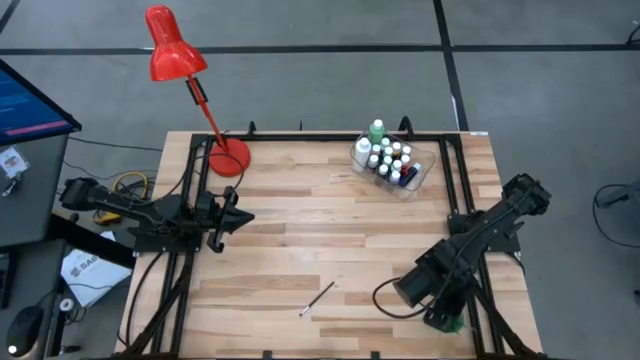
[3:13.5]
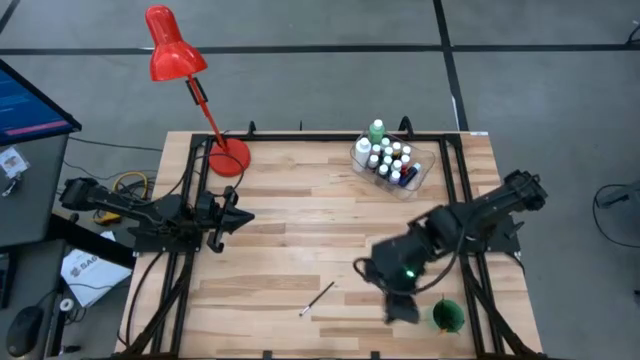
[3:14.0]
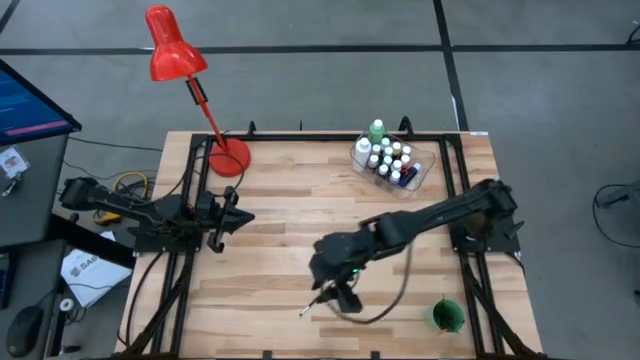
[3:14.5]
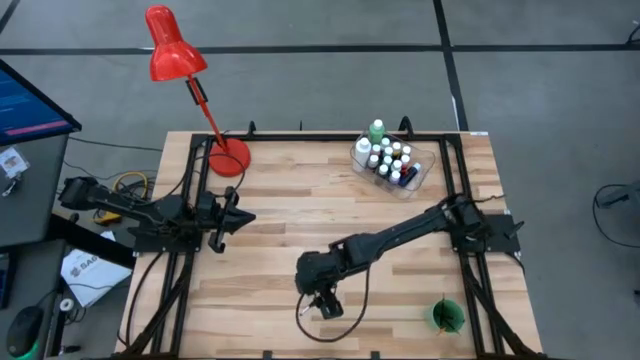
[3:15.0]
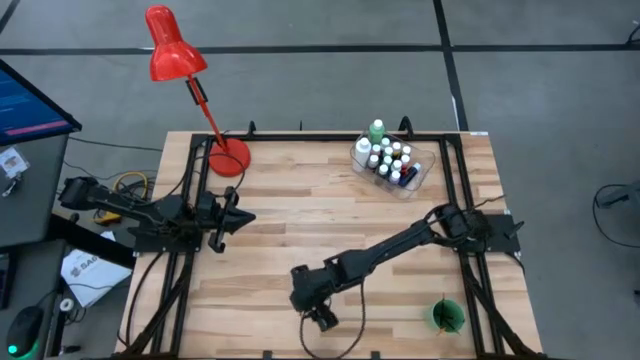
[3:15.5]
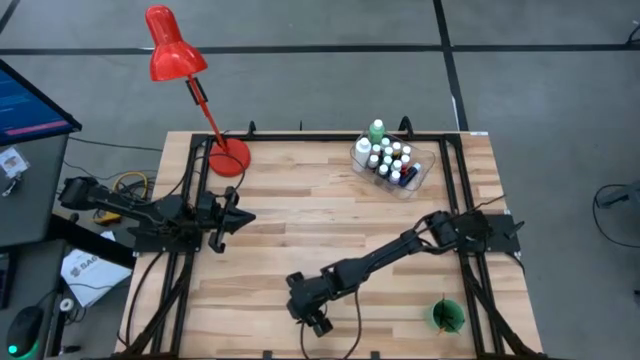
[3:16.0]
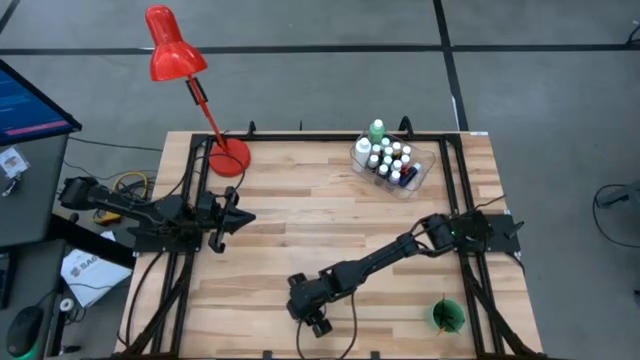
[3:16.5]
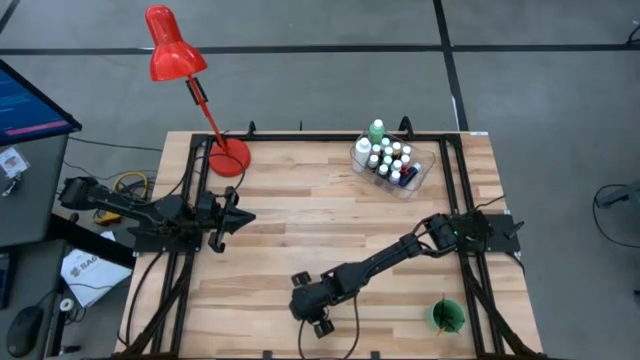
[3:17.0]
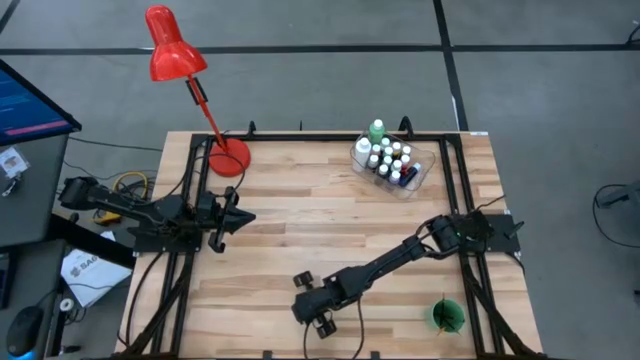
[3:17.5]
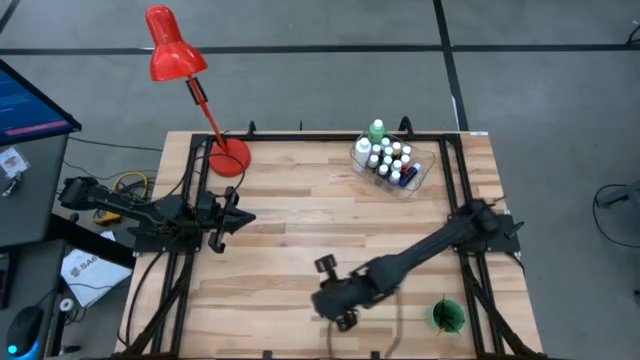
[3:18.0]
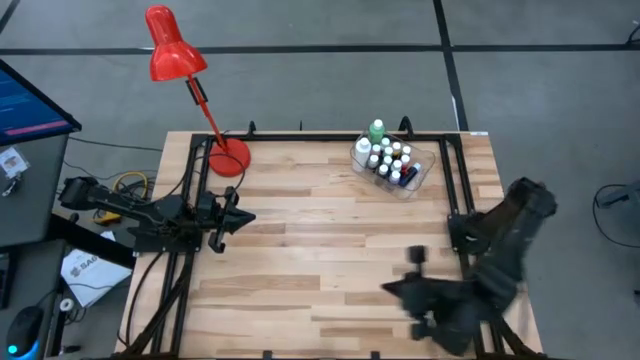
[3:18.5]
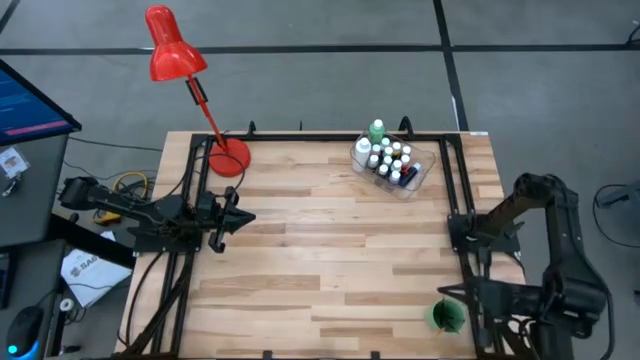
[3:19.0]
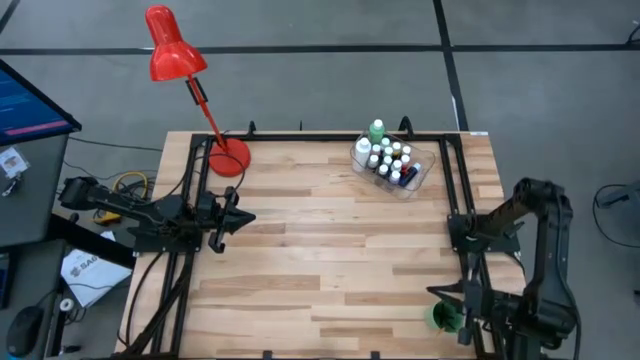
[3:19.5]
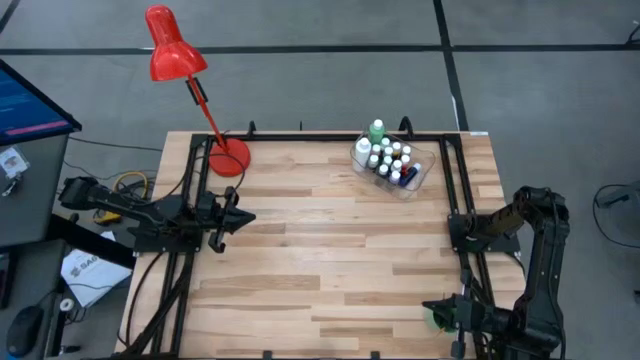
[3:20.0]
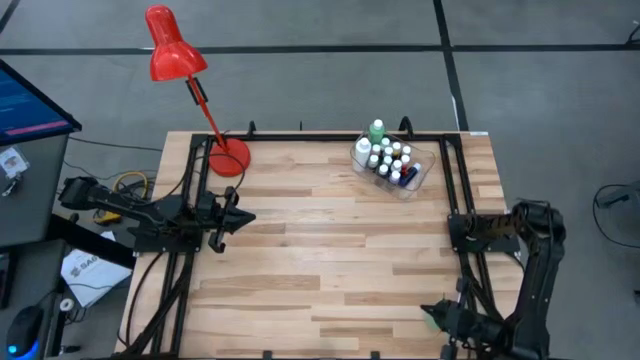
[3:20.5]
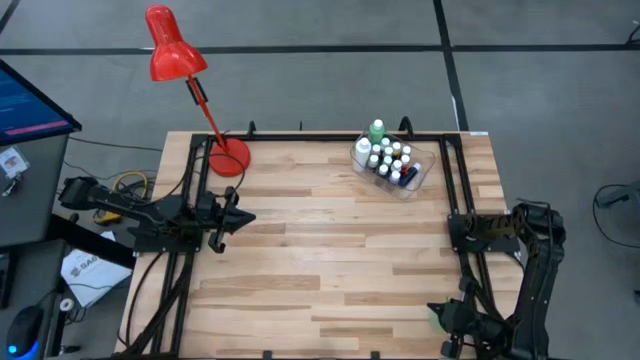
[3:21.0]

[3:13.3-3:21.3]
Task: Pick & Place Paint Supplies
Put the white paint brush into the green cup

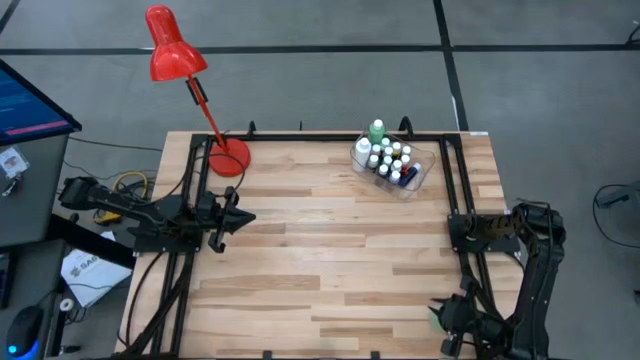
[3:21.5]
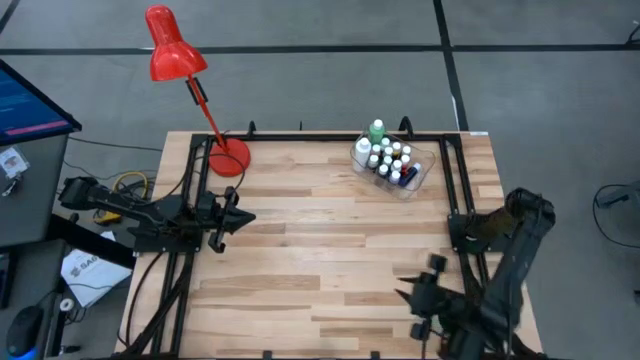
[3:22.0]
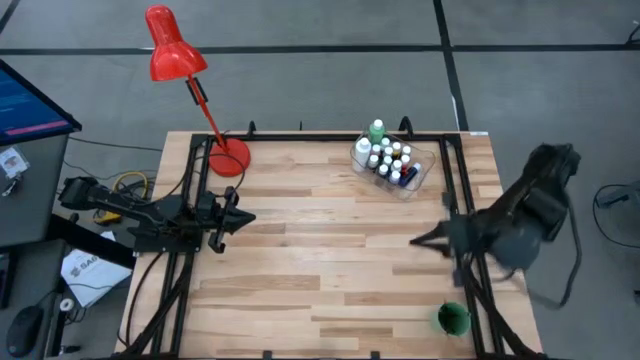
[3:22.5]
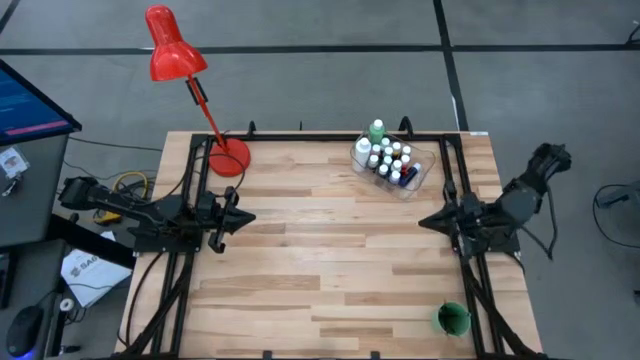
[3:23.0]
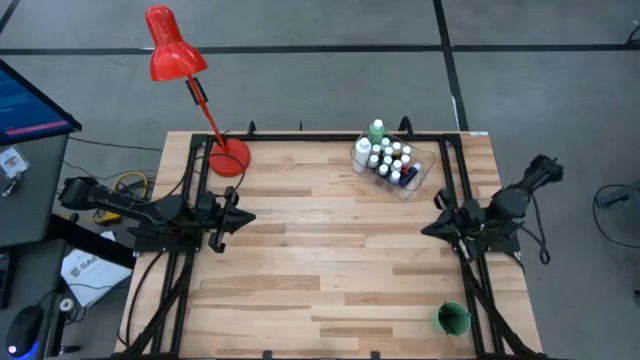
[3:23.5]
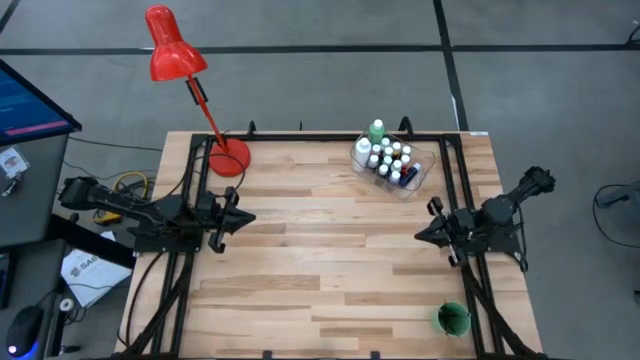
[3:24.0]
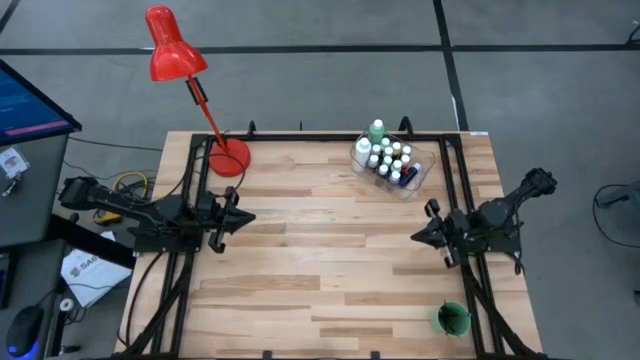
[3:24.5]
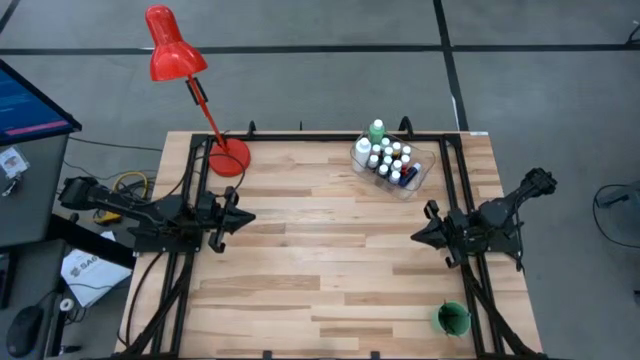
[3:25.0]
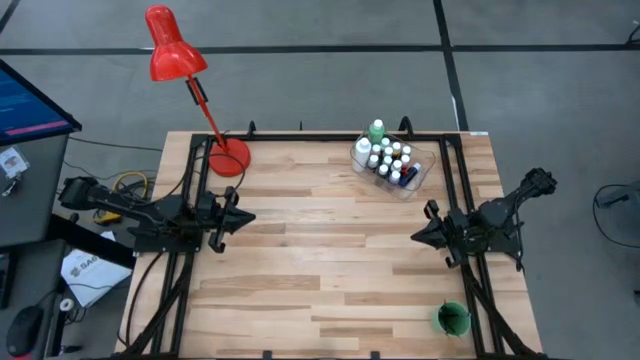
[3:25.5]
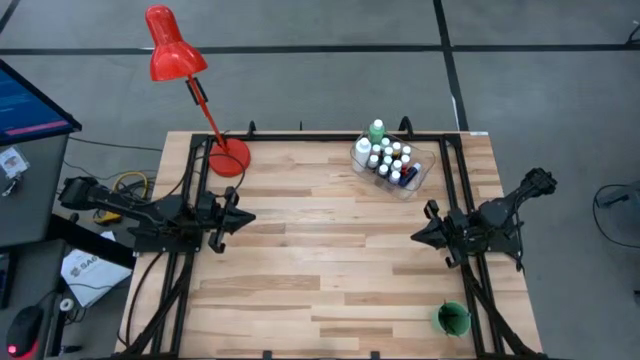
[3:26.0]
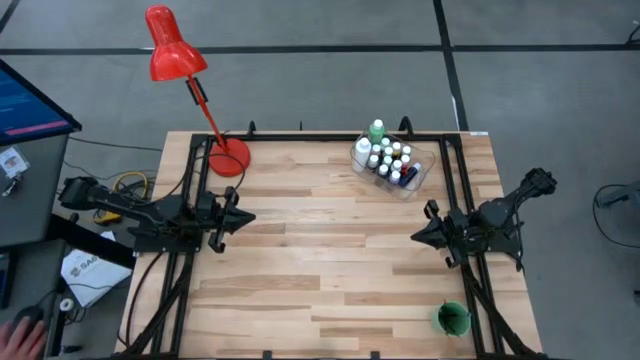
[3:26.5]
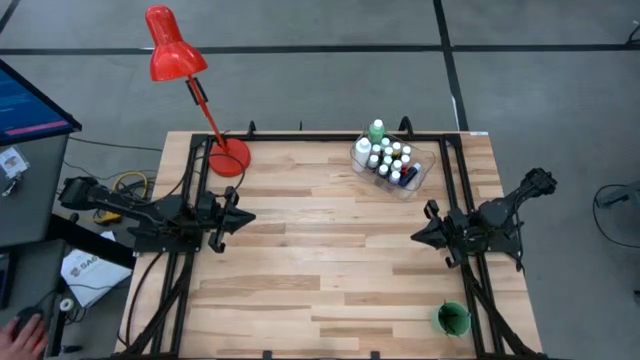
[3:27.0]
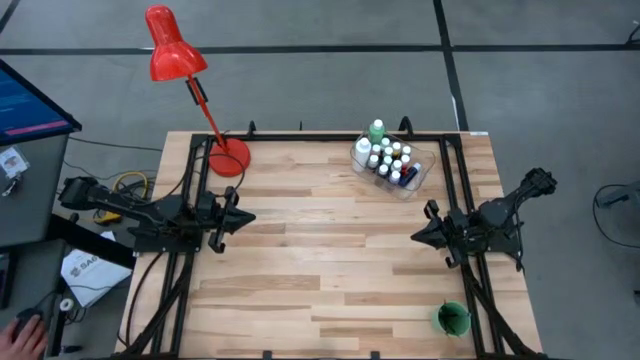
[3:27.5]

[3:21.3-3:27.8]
Return to Home Position

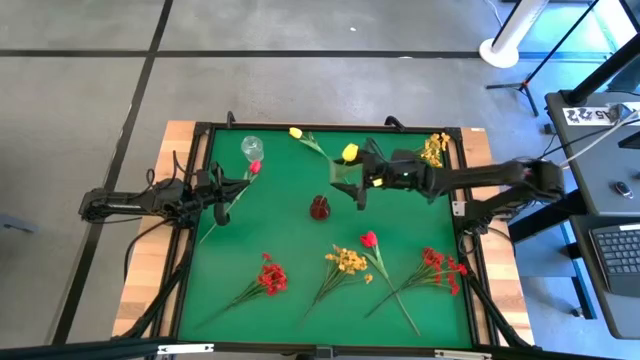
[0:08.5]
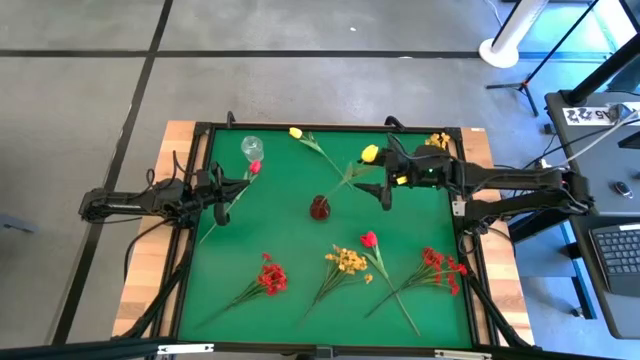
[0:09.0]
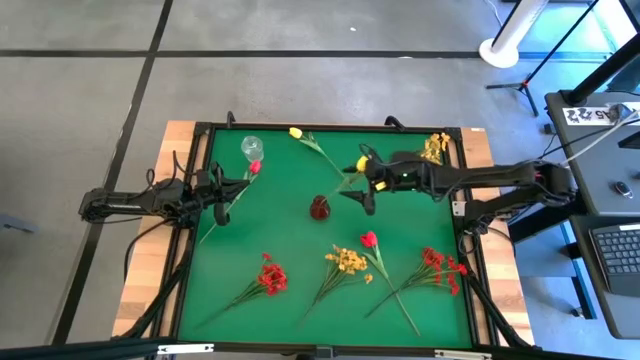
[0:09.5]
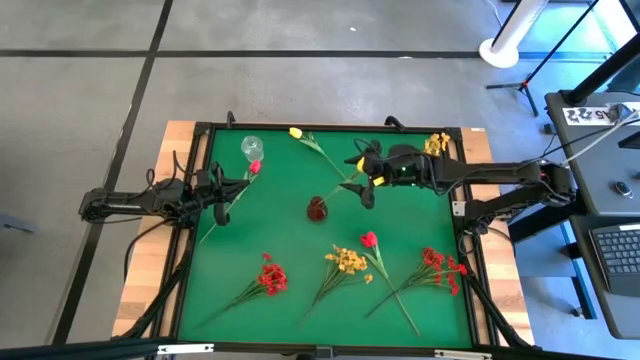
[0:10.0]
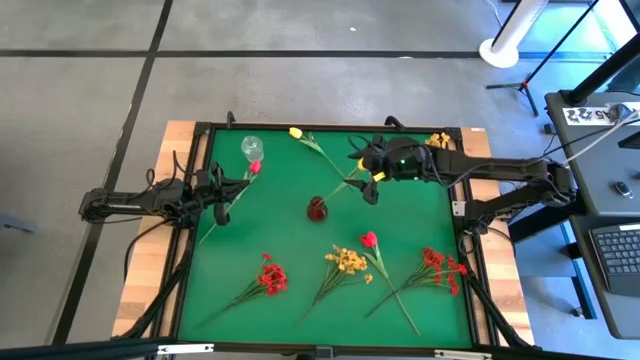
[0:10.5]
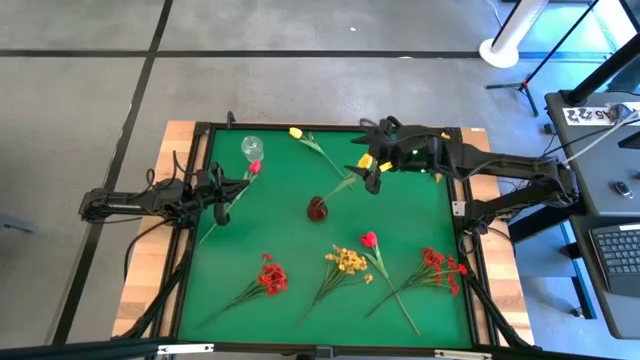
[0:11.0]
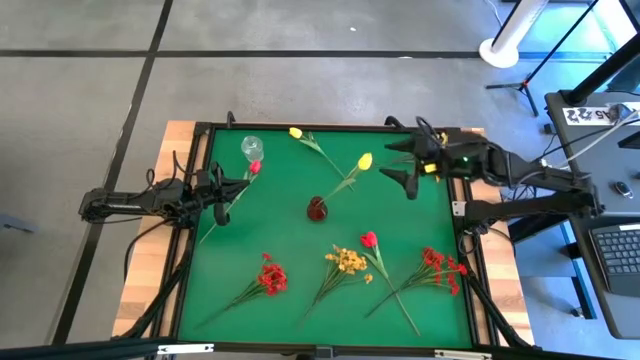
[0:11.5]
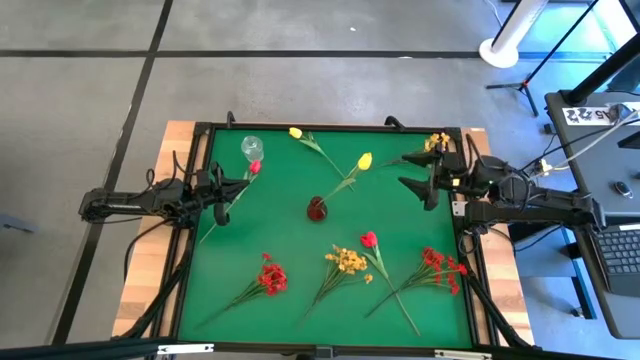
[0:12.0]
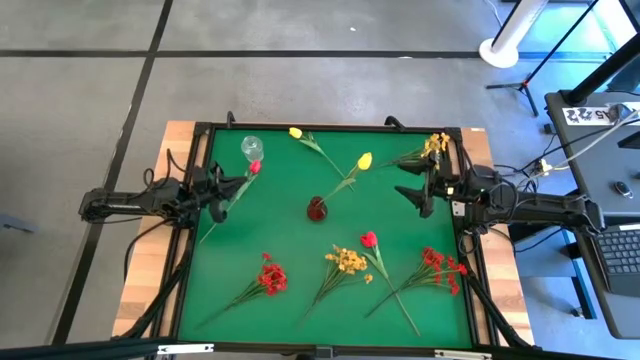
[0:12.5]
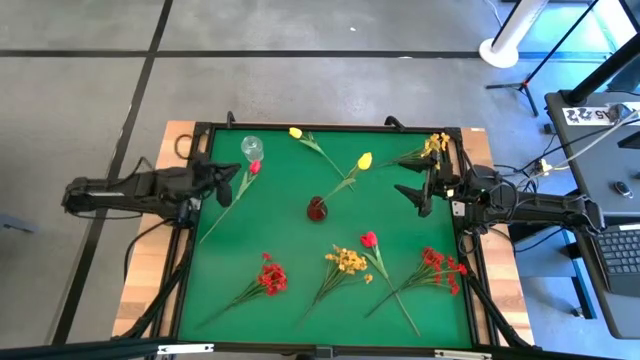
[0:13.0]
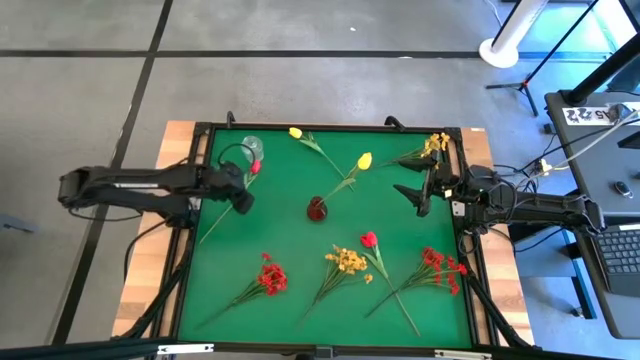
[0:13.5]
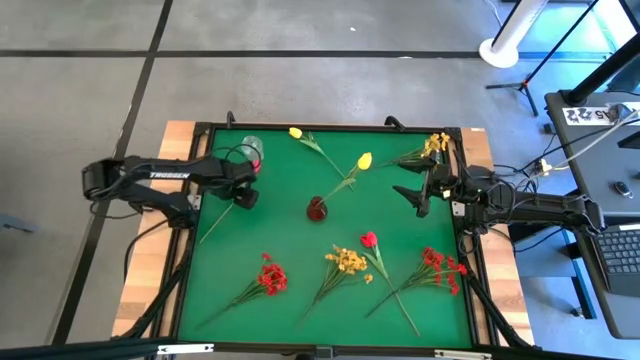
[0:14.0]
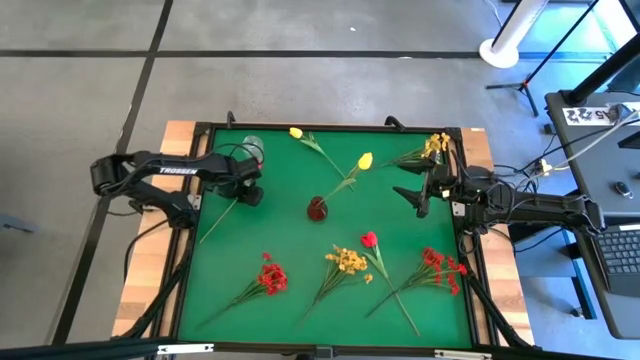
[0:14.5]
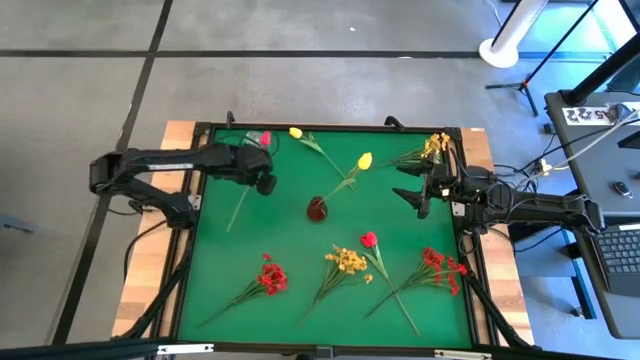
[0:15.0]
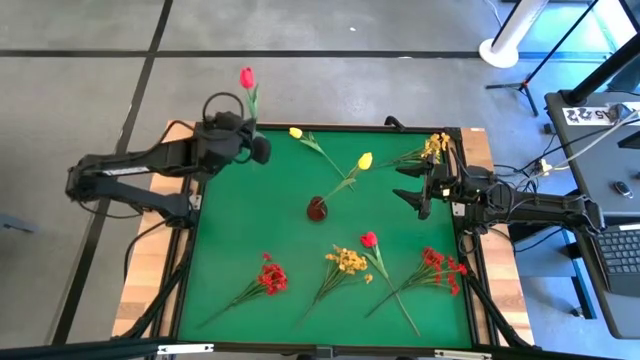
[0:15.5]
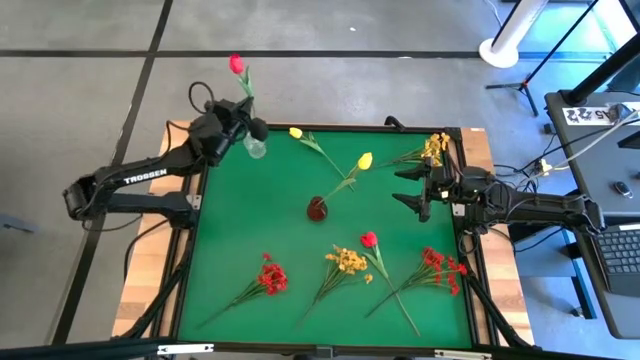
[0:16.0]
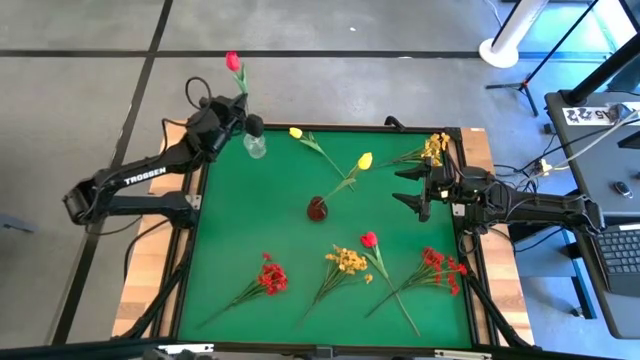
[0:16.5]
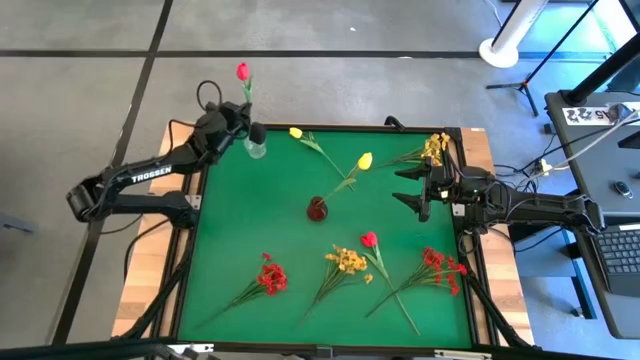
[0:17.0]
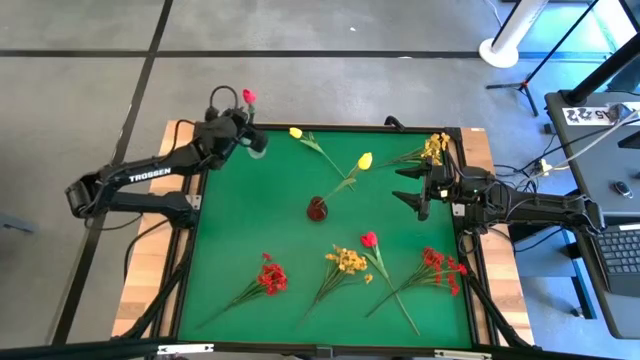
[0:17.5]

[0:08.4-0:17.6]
Task: Sort flowers into vase by color
Put the top red tulip into the transparent flower vase
